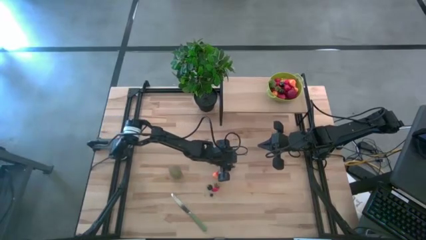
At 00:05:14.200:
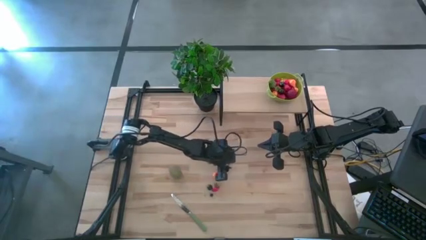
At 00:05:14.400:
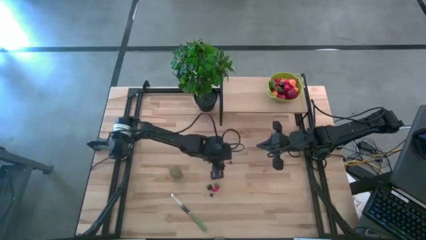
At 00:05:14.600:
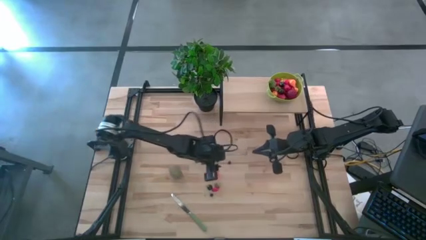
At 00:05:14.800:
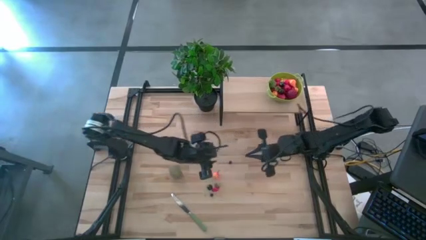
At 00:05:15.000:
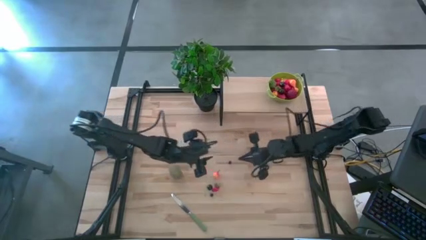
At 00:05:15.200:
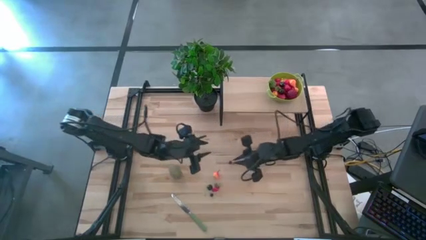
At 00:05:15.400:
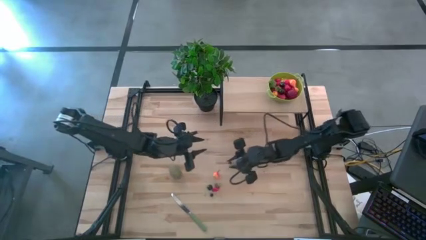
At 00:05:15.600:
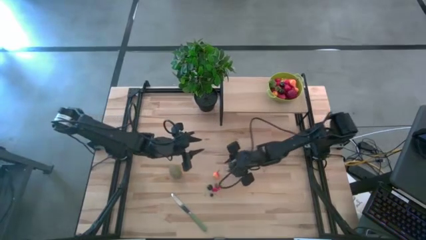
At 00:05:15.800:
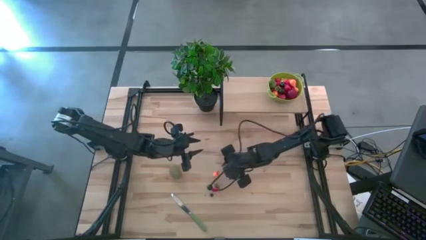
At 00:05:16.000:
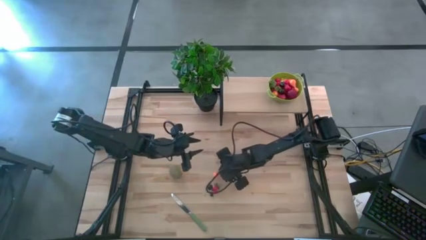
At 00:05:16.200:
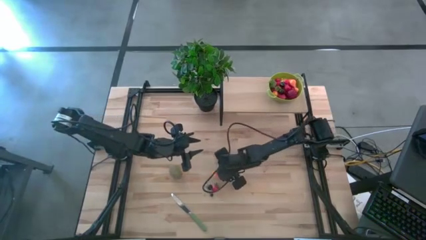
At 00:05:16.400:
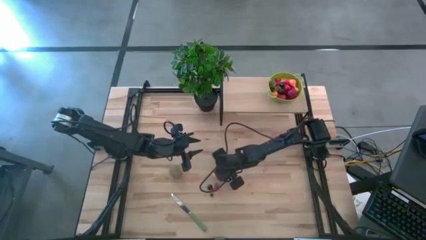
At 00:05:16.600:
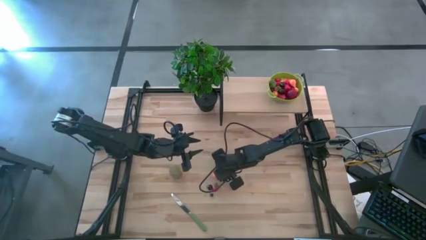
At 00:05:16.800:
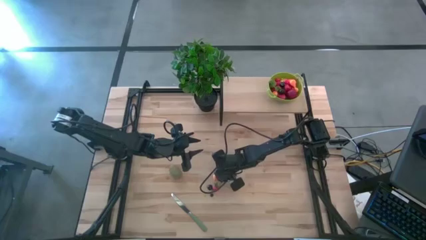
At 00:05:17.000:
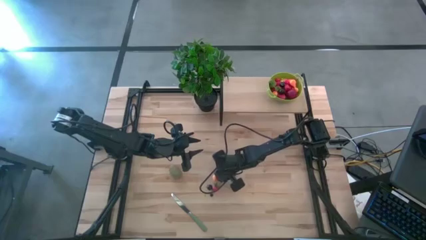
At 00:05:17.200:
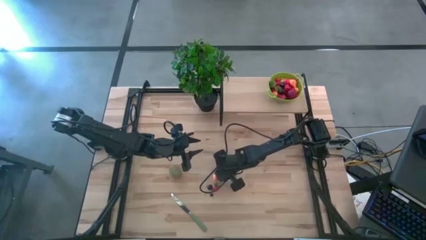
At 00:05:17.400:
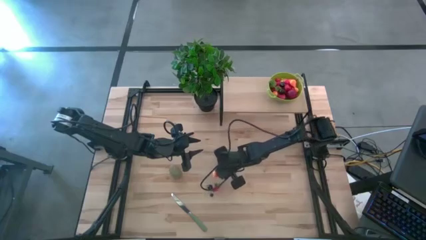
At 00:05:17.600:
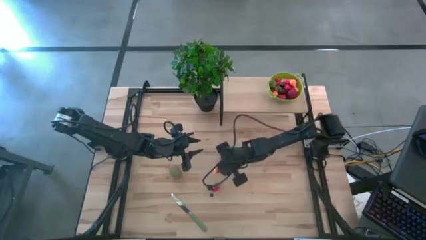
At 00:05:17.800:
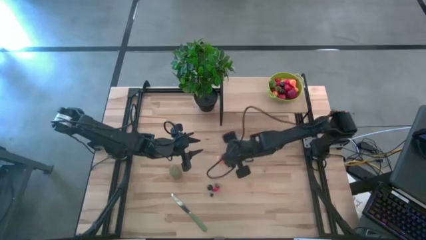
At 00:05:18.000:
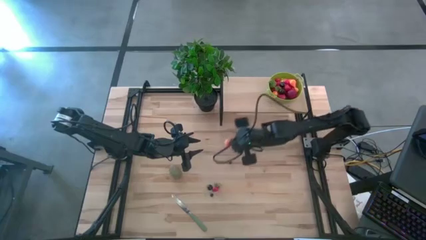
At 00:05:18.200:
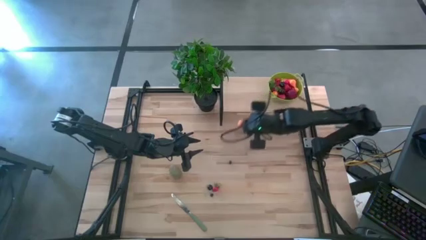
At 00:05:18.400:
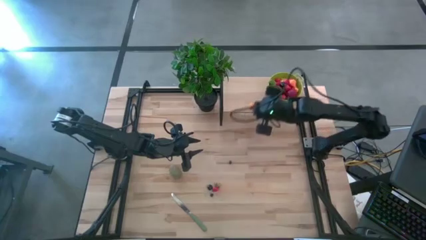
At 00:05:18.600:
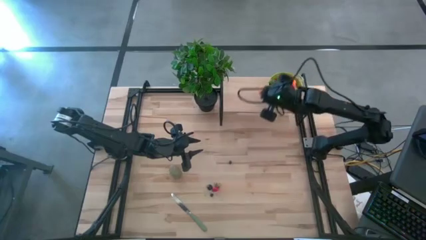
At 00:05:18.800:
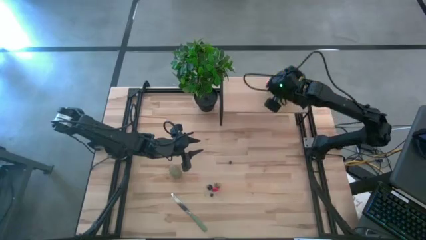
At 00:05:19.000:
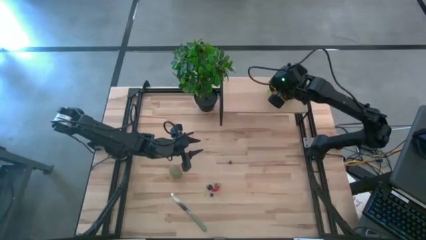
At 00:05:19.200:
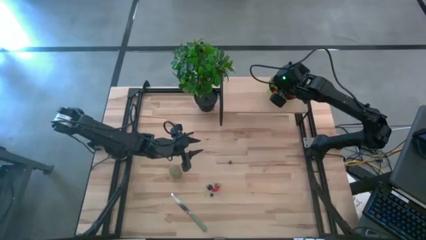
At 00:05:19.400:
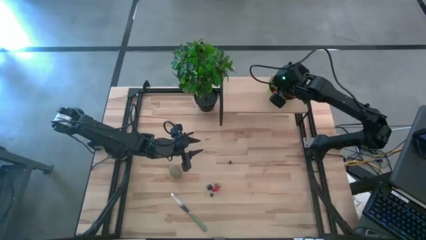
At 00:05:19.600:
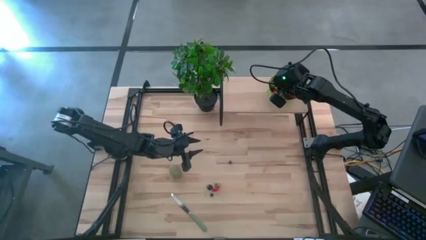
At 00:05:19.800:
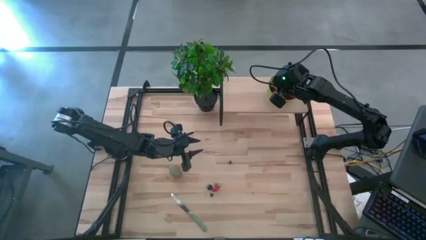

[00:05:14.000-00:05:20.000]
Task: Pick & Place Fruit
Put the pear into the green strainer bowl on the shelf

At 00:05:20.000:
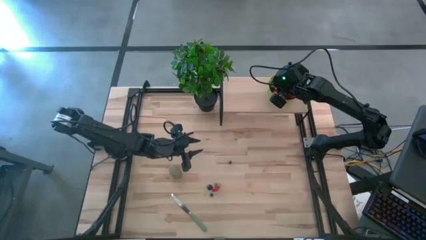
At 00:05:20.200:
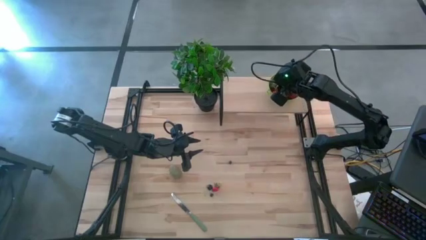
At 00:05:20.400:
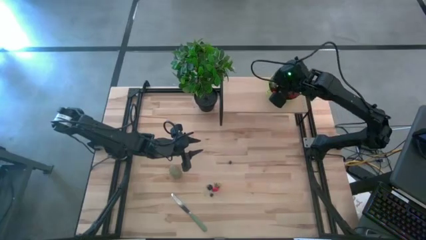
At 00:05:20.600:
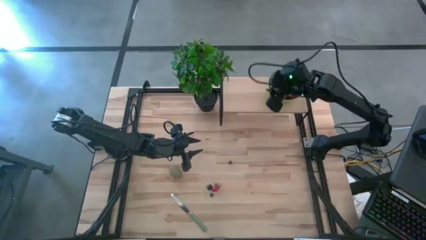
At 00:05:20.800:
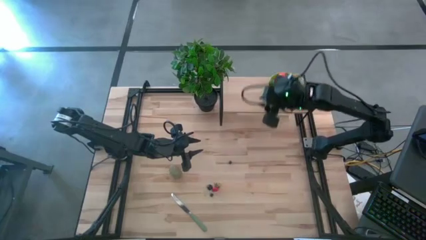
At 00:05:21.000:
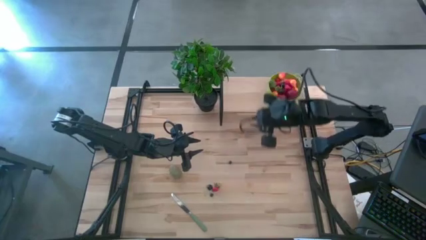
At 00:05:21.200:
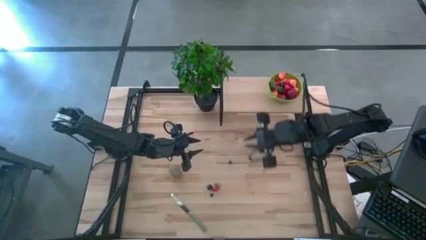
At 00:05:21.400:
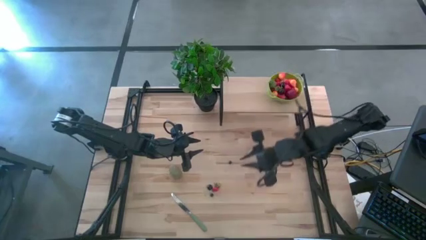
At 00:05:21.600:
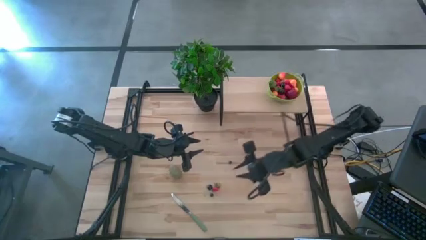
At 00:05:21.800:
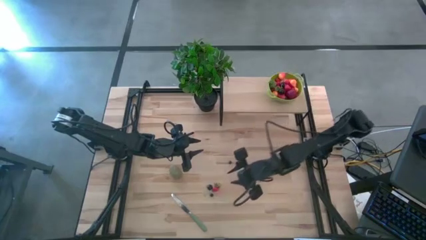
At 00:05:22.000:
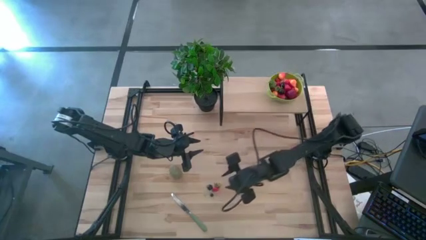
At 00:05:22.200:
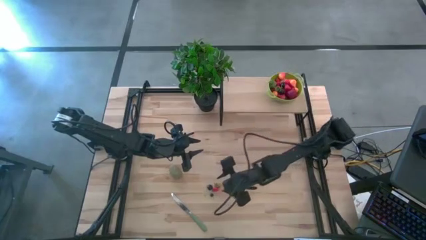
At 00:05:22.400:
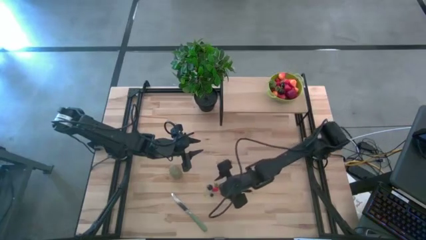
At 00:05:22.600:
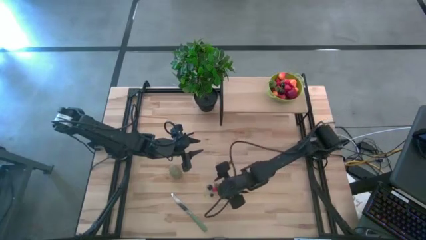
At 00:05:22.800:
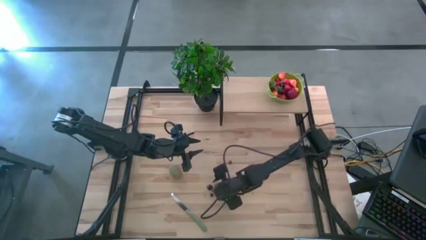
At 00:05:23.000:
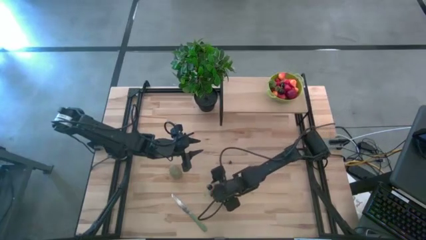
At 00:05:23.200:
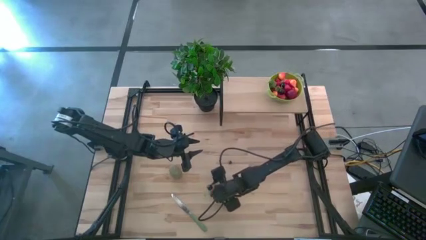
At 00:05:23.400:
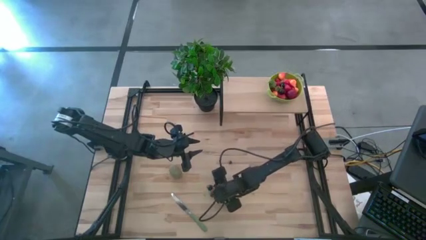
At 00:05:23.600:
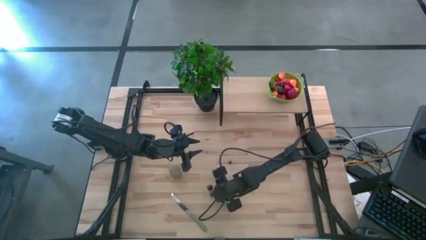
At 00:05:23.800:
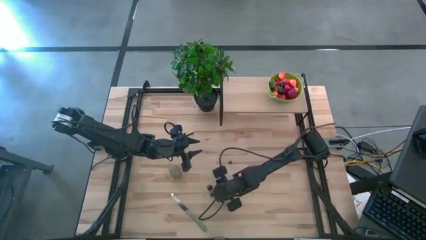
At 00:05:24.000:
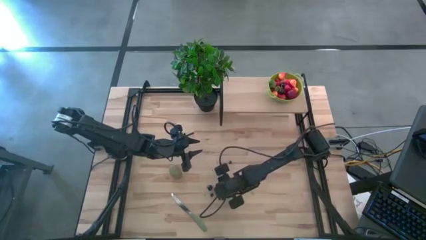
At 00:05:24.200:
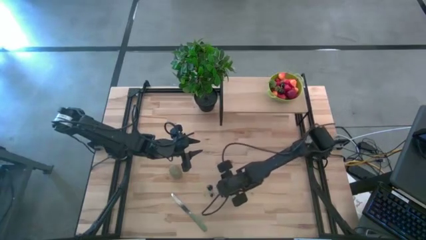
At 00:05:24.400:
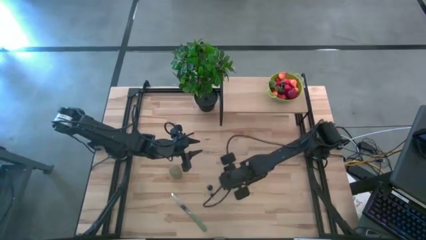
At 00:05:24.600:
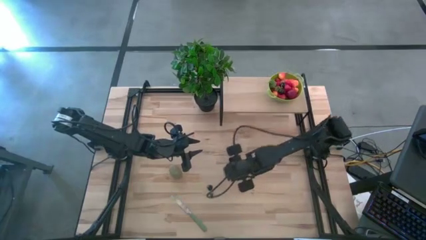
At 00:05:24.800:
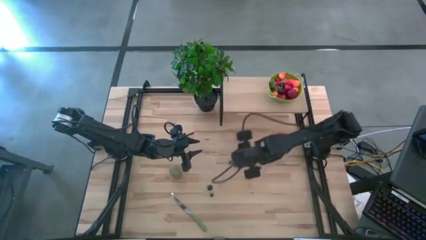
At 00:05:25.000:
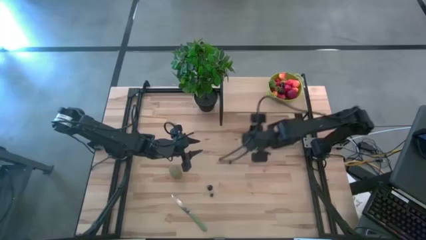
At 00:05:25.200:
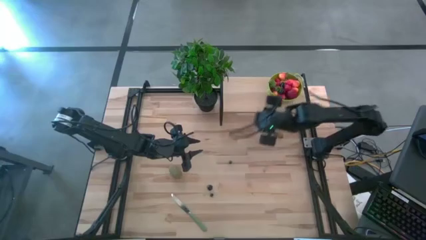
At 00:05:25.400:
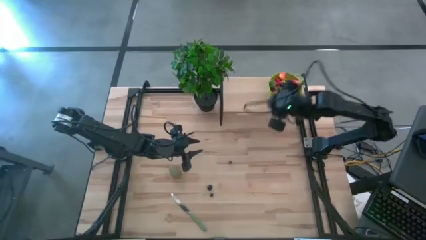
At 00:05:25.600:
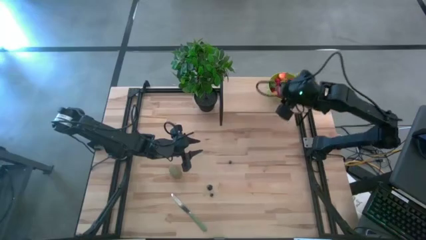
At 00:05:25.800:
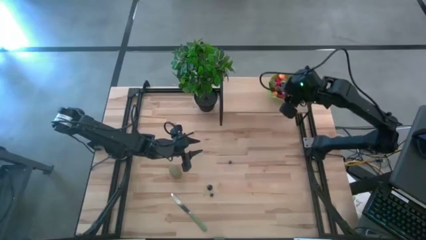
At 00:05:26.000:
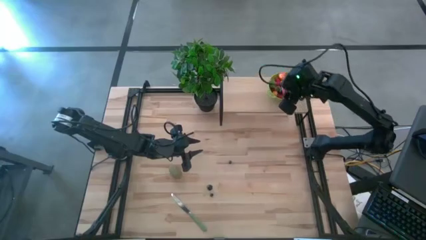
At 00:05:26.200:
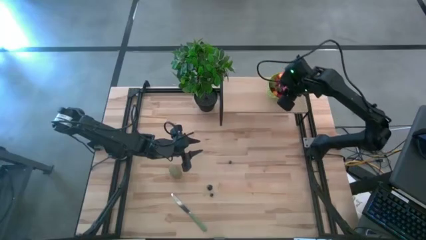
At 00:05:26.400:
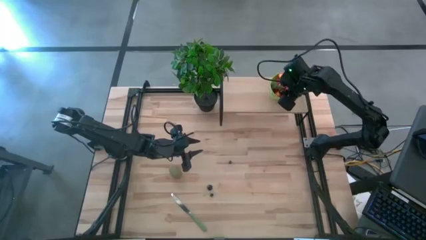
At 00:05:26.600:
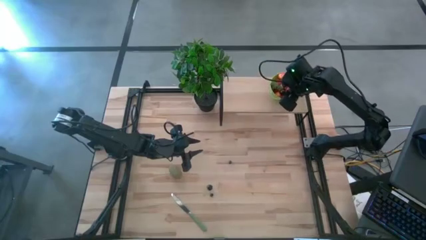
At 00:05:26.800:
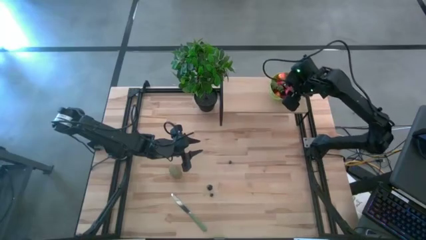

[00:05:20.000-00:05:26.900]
Put the strawberry into the green strainer bowl on the shelf
